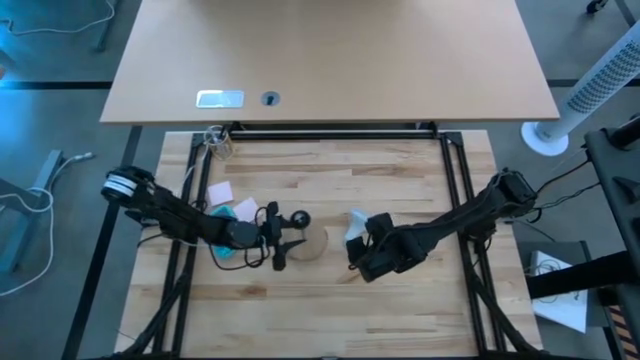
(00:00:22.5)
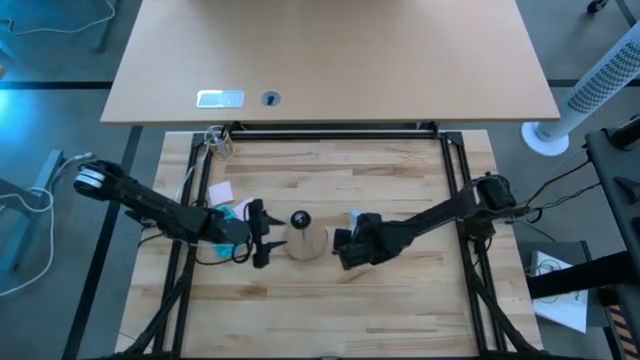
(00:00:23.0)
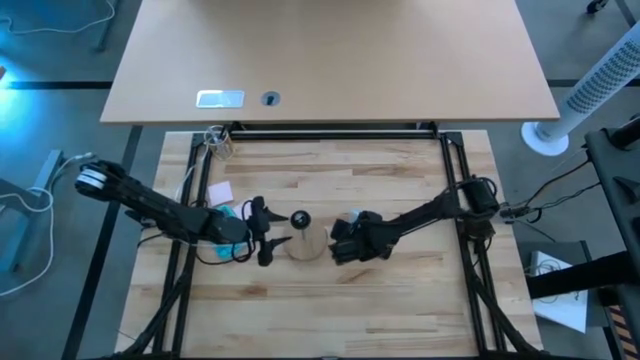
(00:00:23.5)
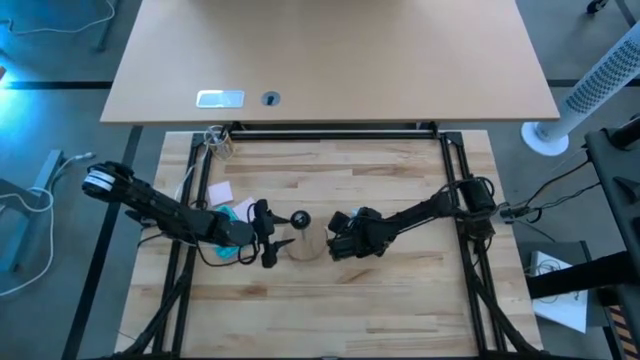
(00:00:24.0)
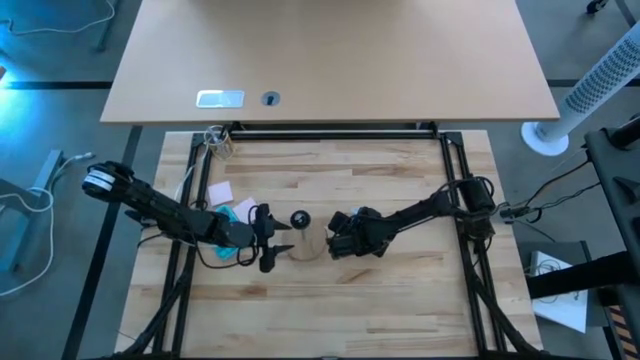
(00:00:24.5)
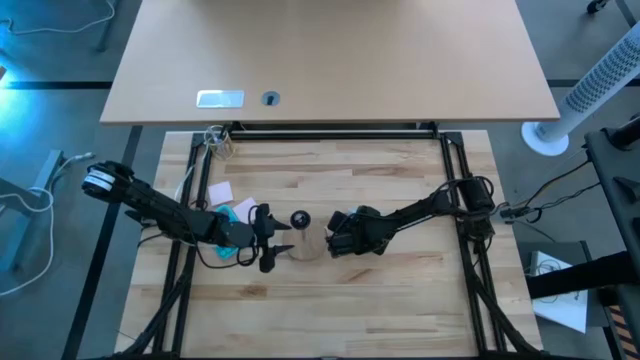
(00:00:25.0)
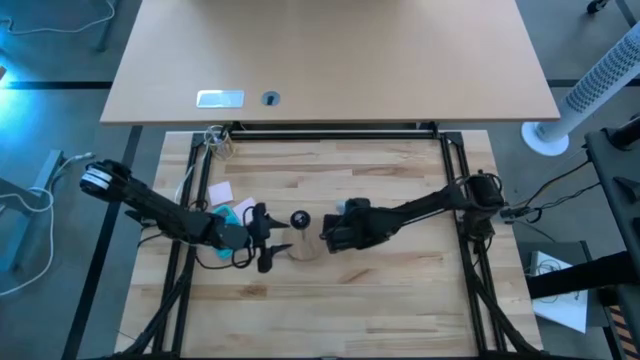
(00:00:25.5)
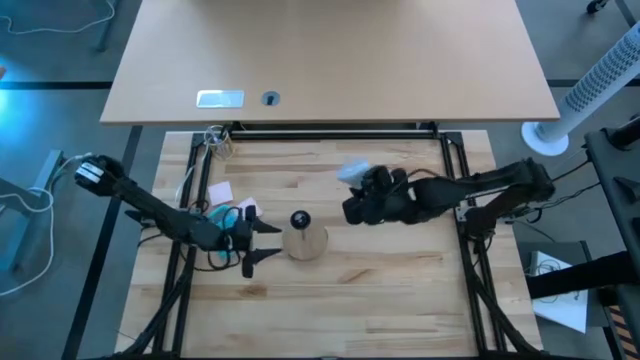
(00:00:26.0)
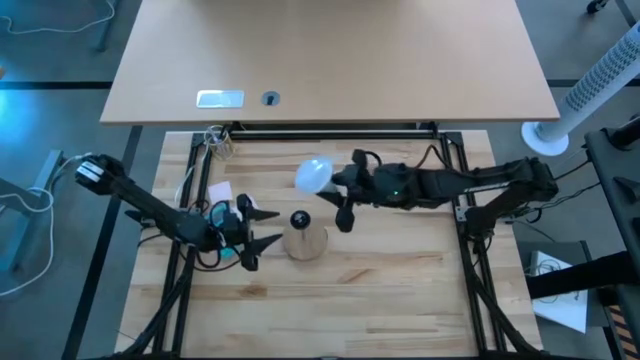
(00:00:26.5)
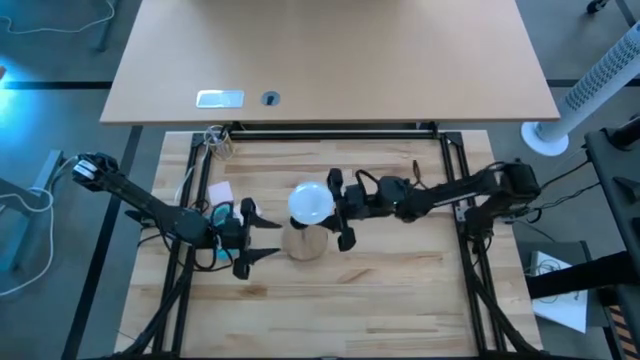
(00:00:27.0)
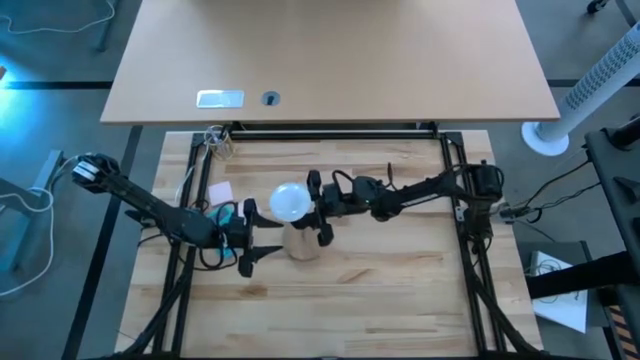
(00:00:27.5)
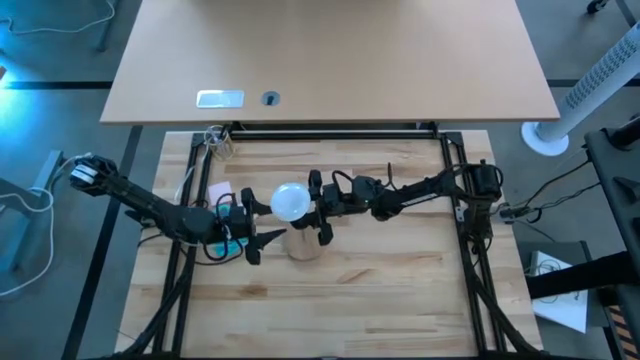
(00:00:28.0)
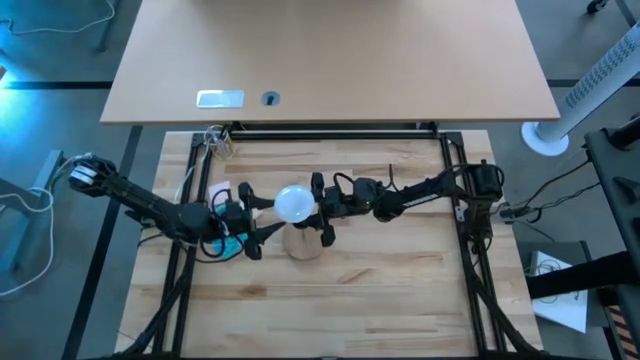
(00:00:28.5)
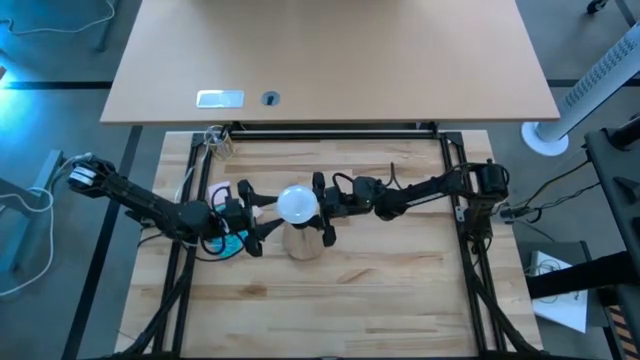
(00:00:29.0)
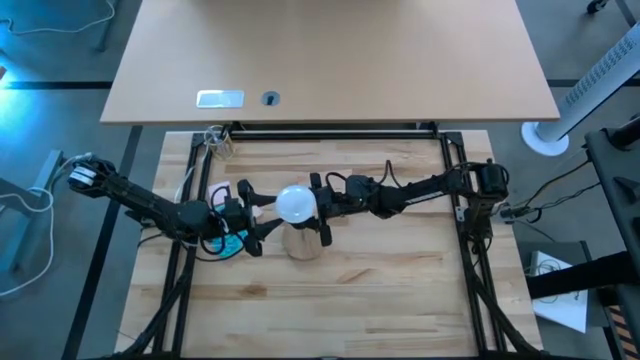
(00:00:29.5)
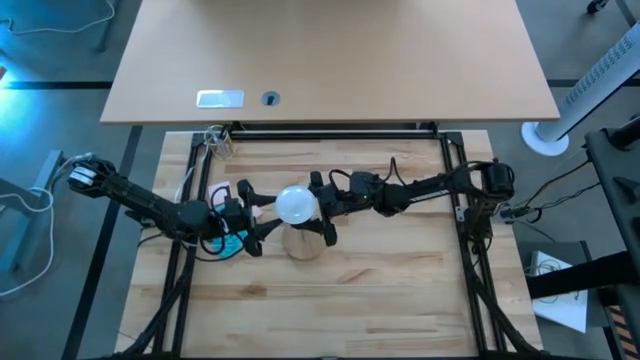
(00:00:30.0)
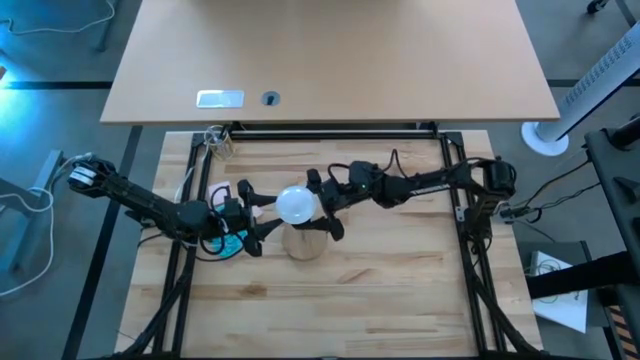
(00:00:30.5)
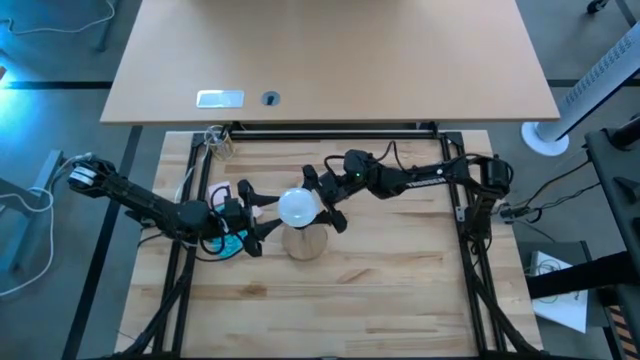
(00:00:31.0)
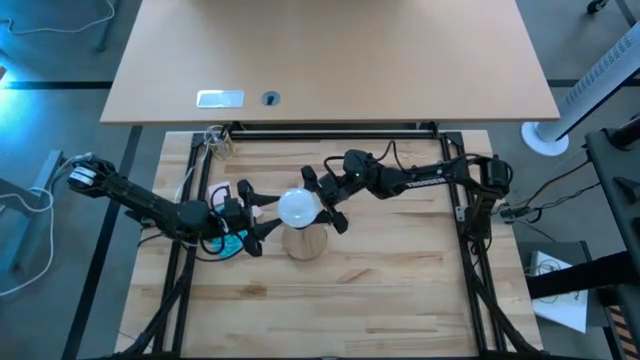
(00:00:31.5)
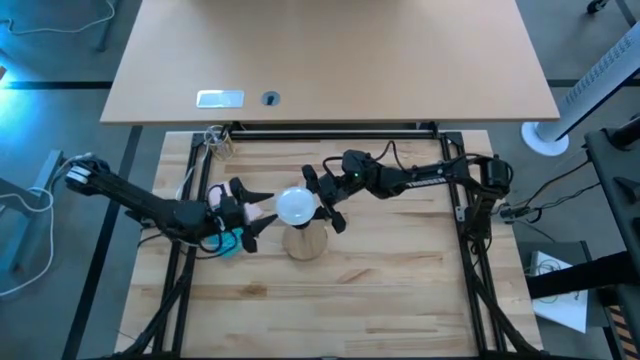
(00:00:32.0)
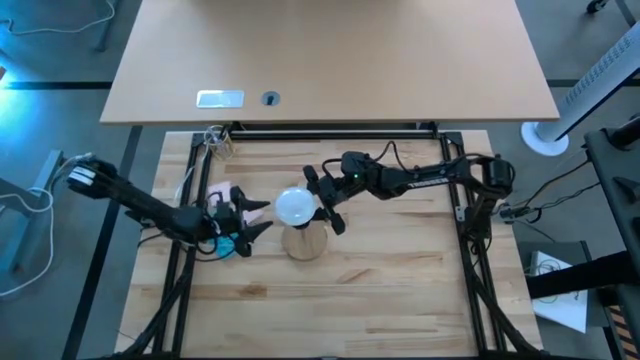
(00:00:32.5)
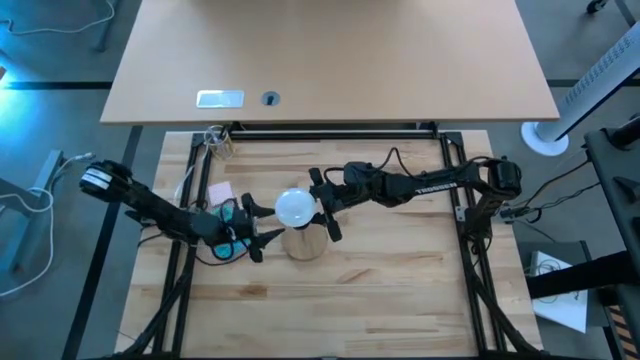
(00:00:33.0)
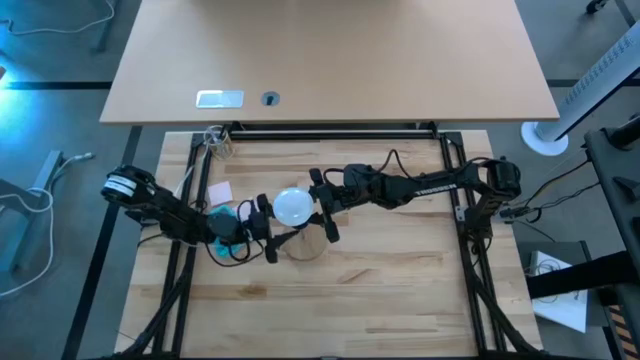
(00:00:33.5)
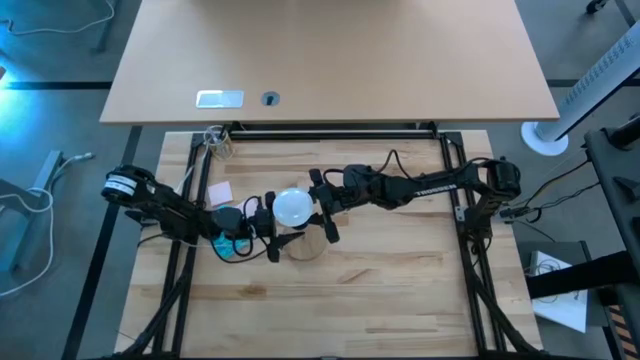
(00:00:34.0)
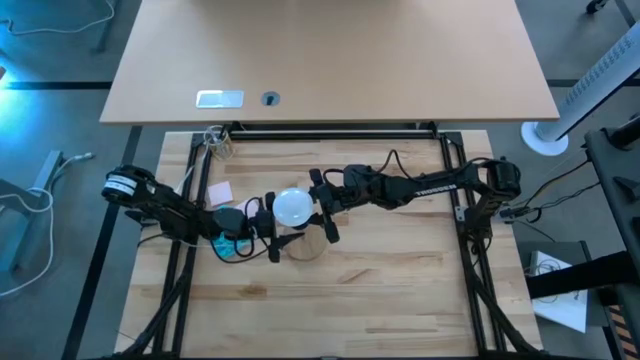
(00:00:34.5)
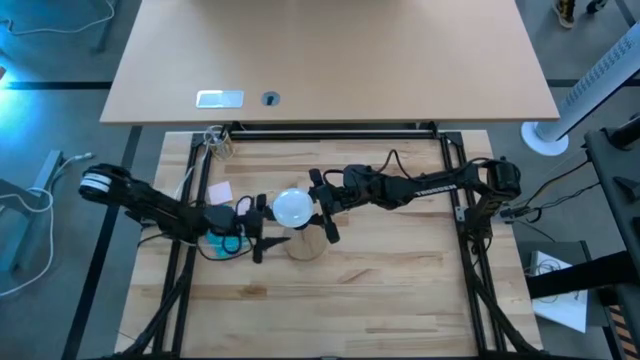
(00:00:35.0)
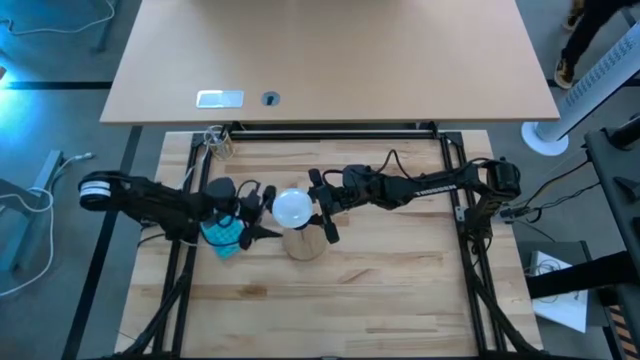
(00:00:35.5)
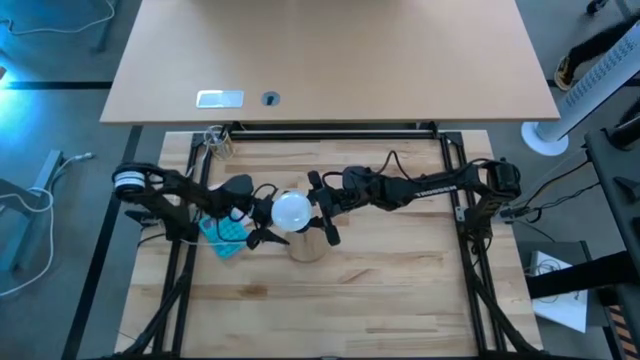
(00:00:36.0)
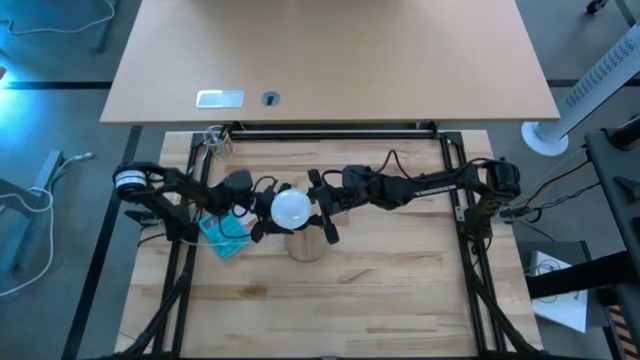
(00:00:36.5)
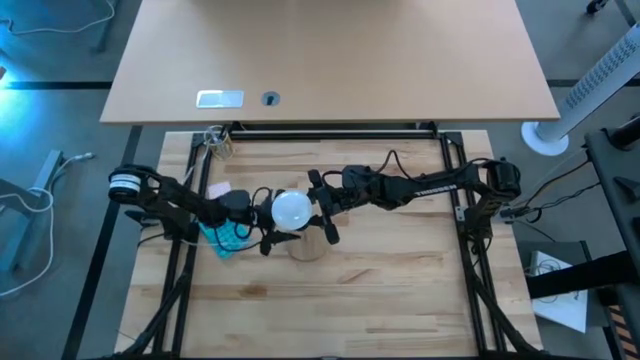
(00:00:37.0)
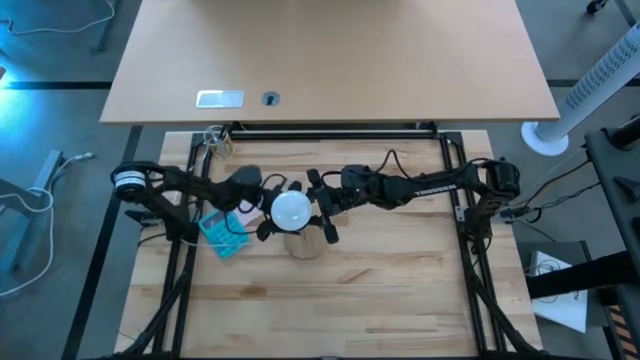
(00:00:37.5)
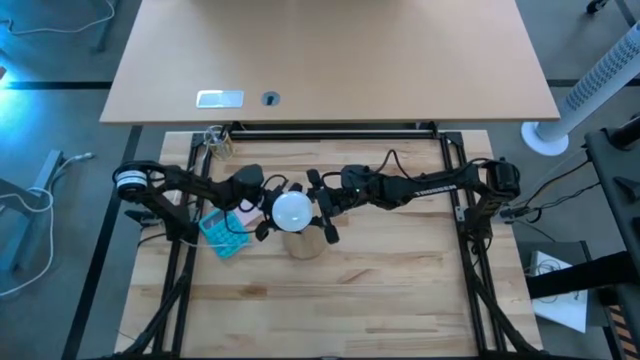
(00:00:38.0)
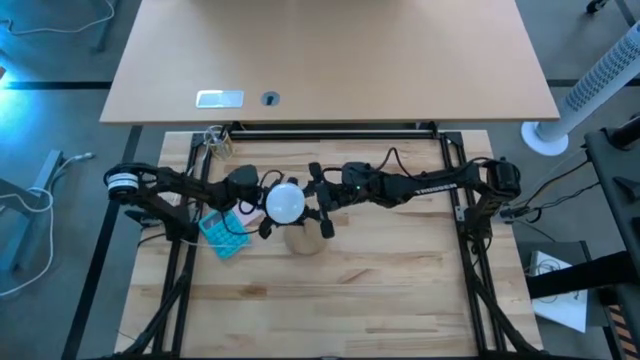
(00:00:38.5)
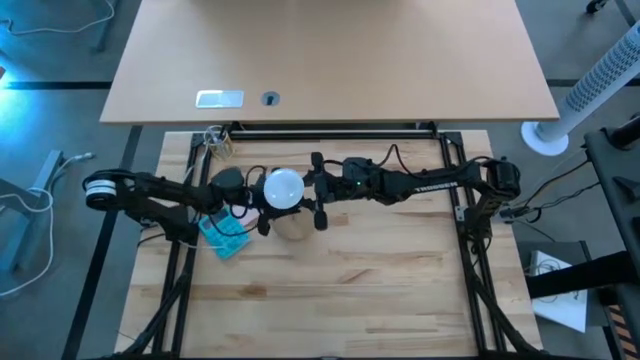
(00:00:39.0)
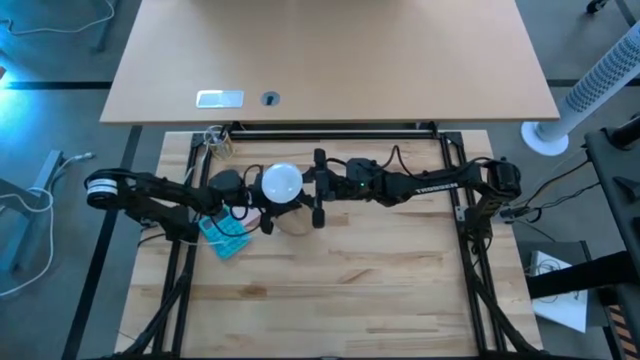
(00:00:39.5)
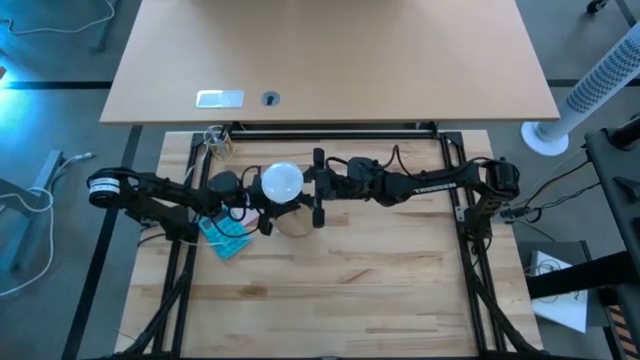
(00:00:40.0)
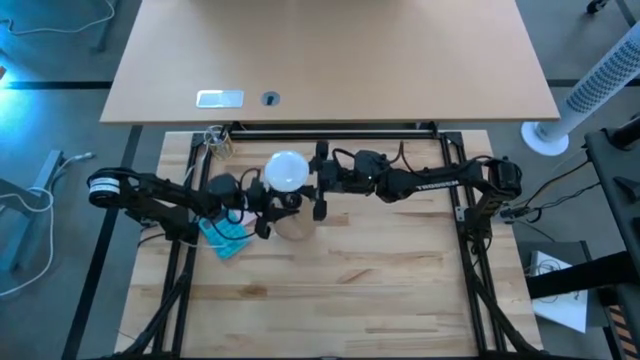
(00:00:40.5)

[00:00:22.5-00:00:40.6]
Task: Screw lightbulb
Insert the lightbulb into the lamp

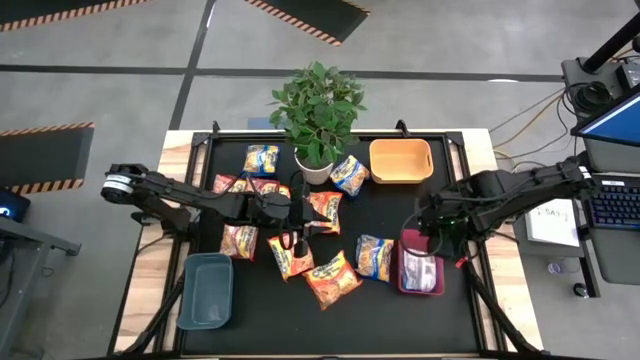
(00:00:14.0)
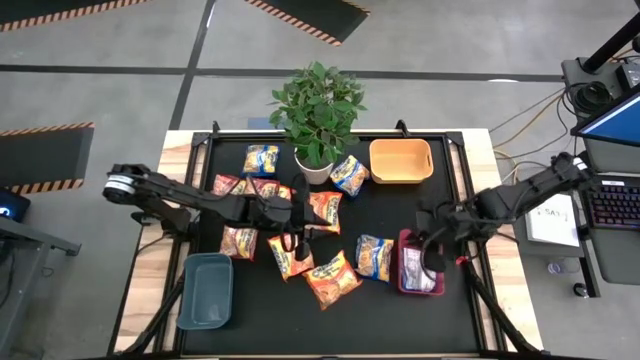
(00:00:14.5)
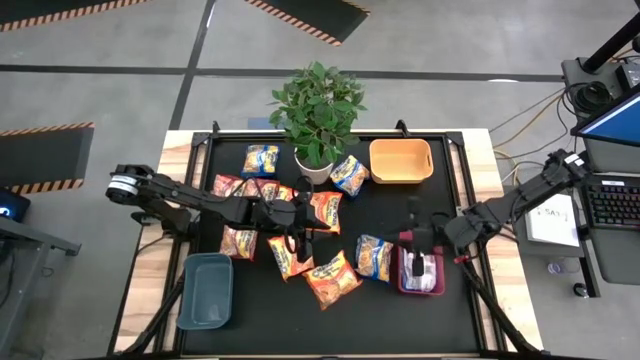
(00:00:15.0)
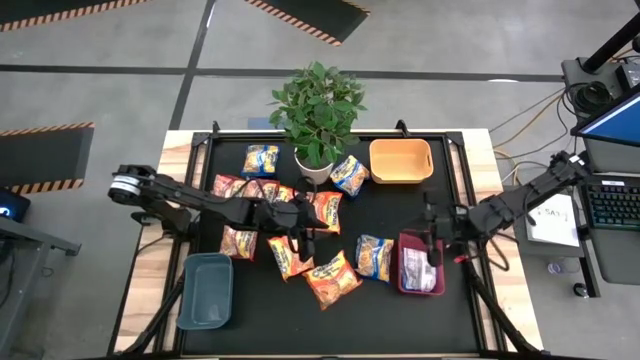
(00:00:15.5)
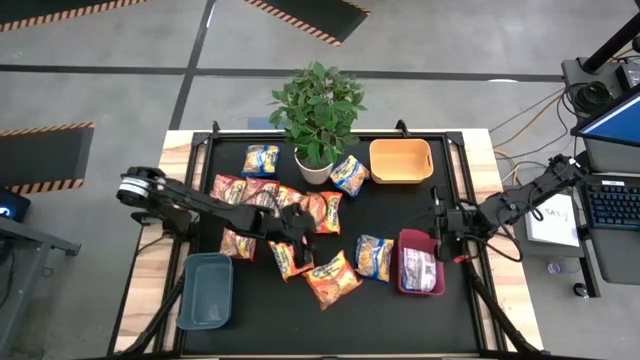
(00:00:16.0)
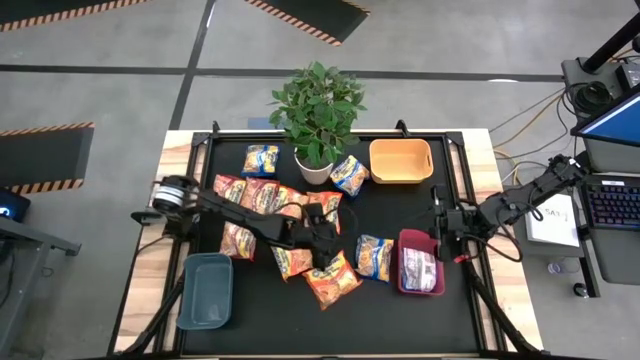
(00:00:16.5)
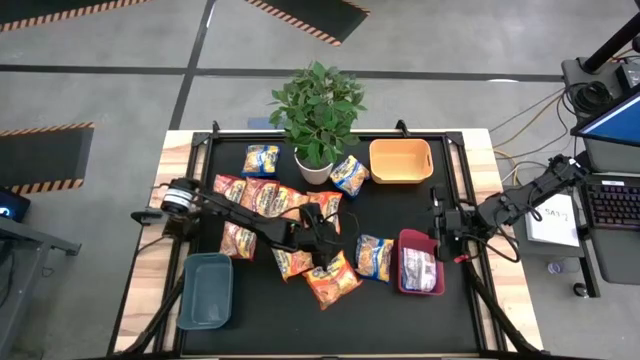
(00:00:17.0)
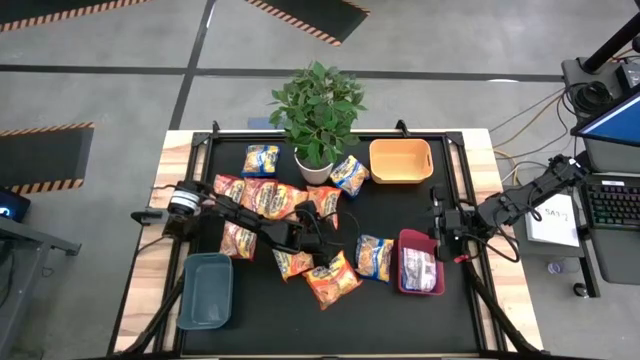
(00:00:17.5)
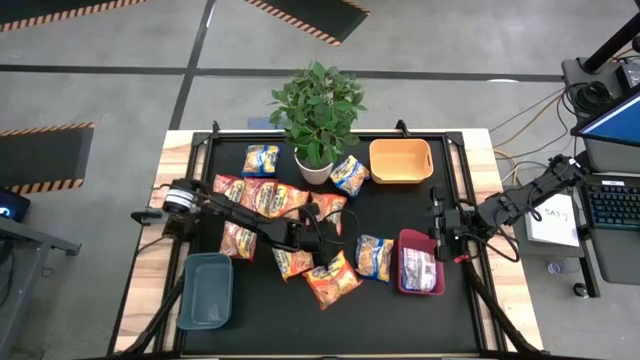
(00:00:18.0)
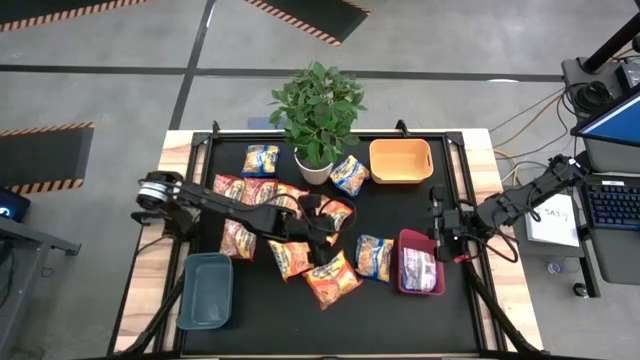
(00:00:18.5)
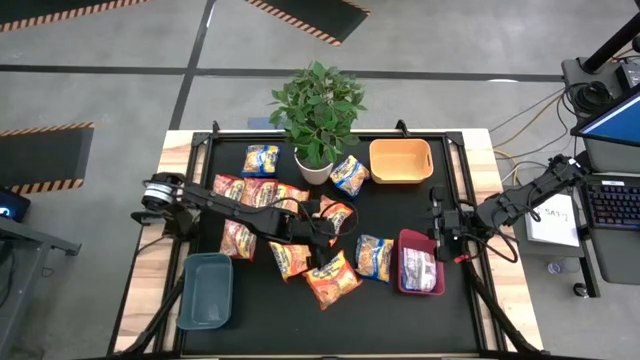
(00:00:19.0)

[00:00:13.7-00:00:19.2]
Task: Sort Maruchan noodles
Put the orange noodle pack into the blue bin
